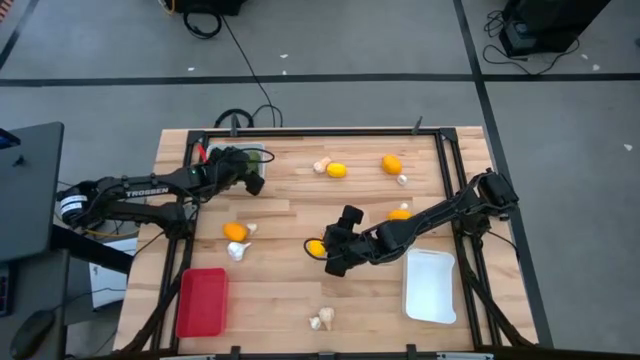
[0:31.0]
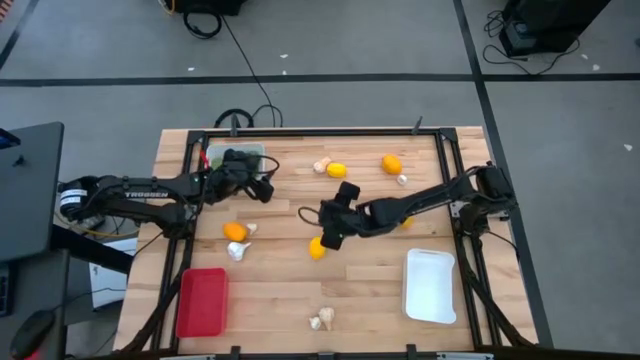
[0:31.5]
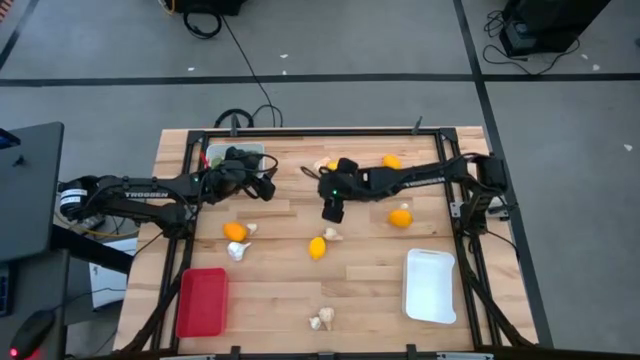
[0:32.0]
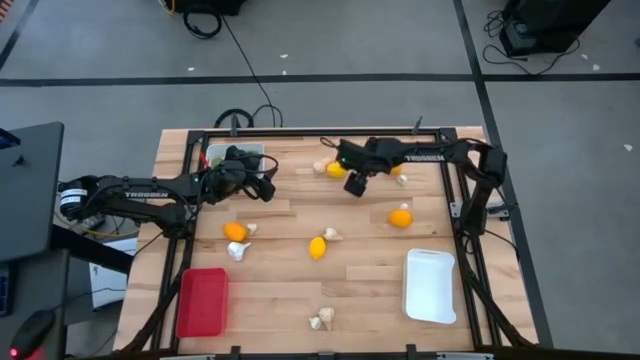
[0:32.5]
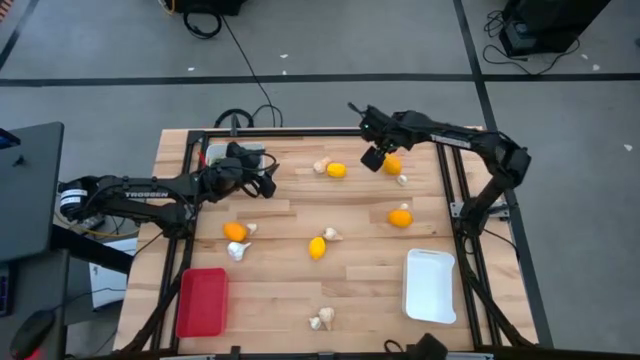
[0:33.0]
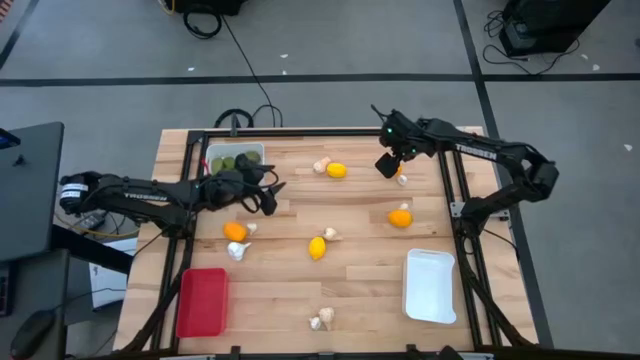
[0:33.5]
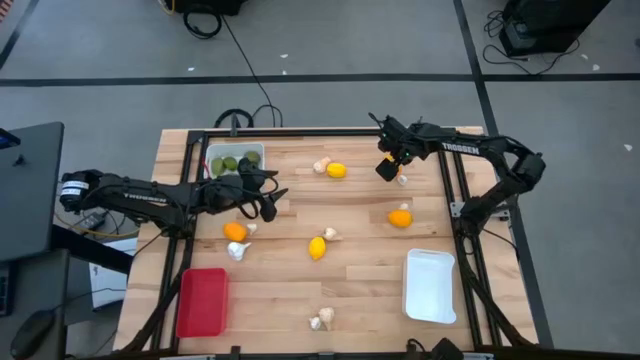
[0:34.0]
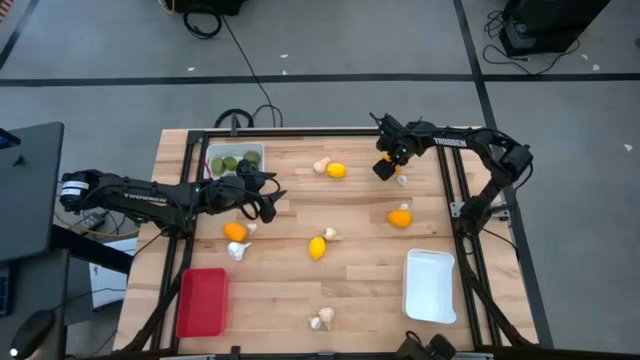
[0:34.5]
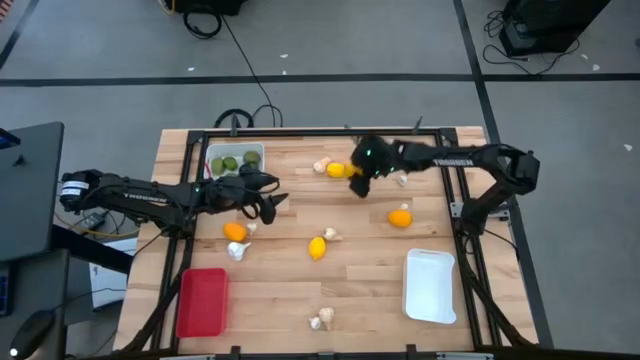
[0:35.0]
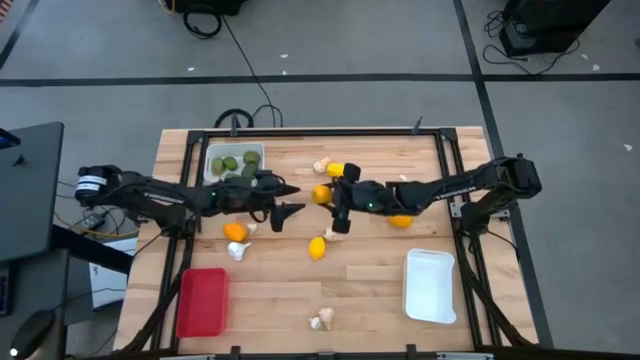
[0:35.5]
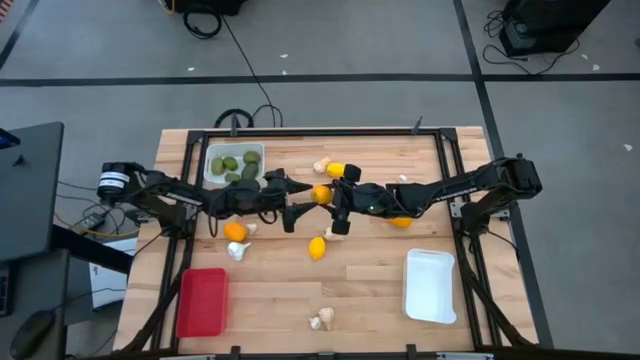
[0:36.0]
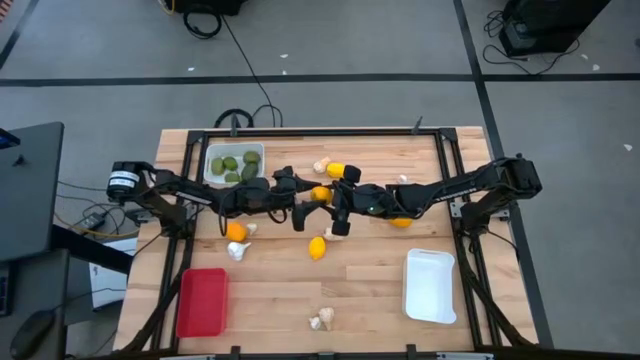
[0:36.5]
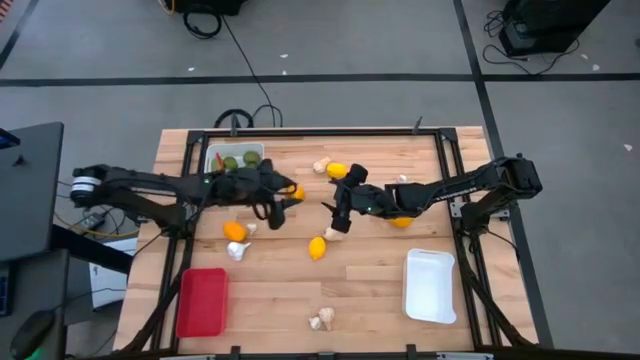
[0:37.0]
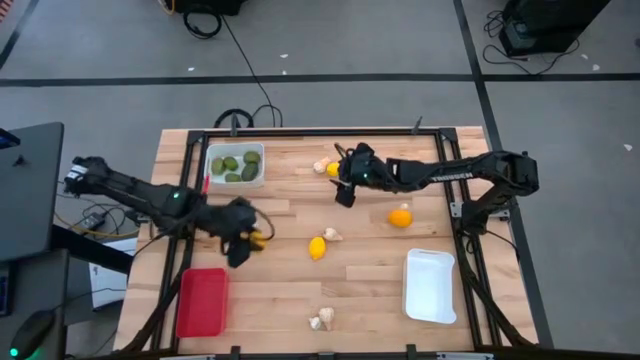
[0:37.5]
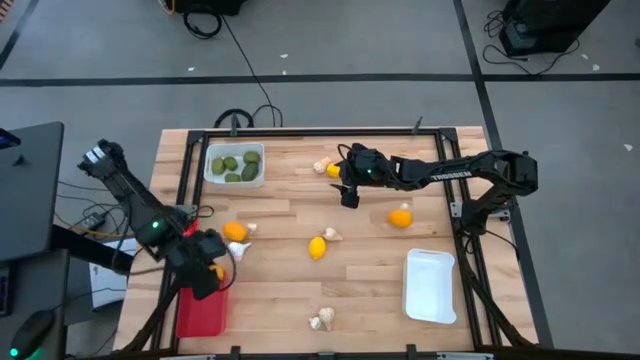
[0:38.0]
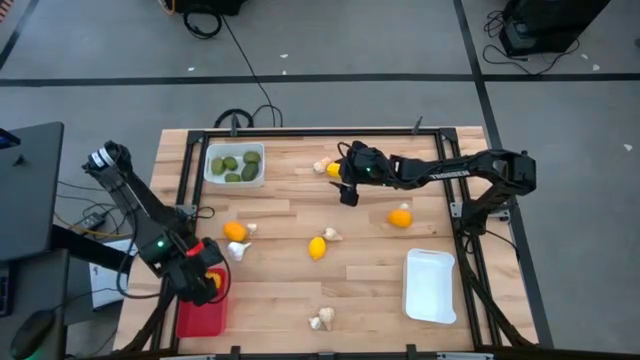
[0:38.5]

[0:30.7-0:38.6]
Task: Sort produce into baskets
Put the top right lemon into the red bin

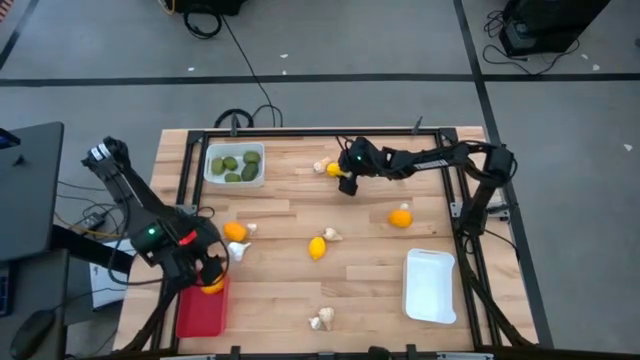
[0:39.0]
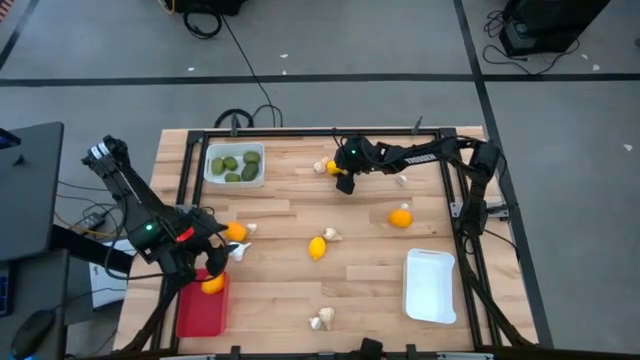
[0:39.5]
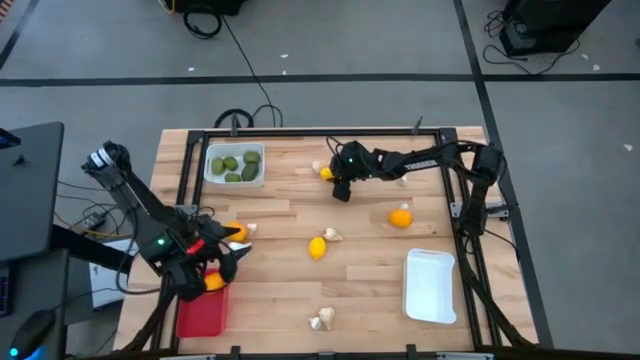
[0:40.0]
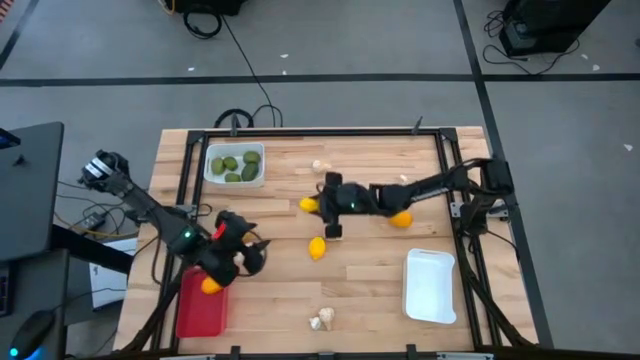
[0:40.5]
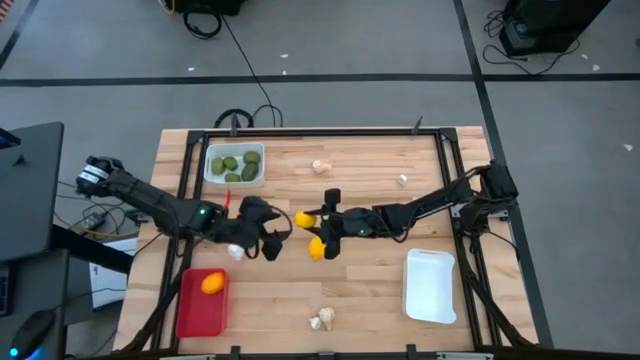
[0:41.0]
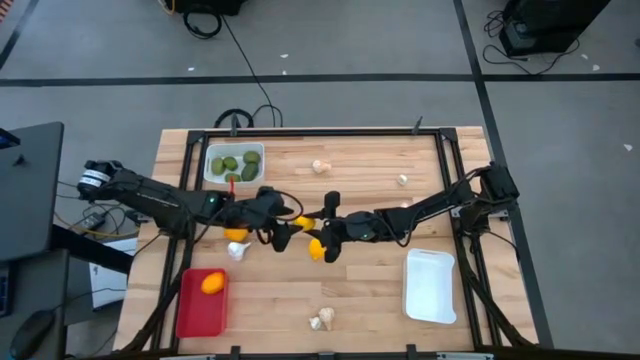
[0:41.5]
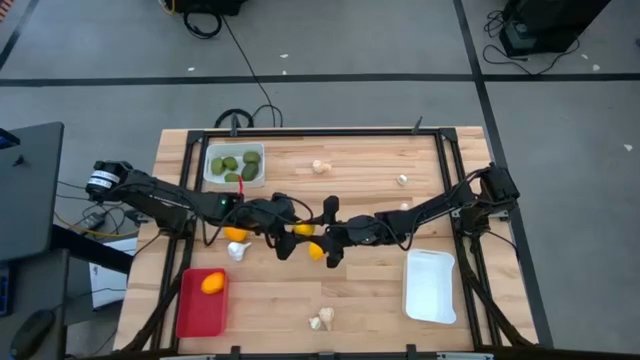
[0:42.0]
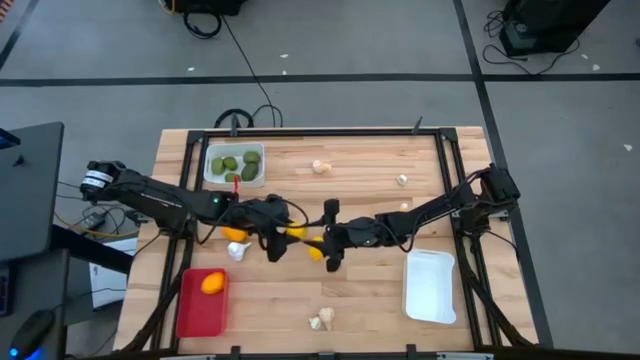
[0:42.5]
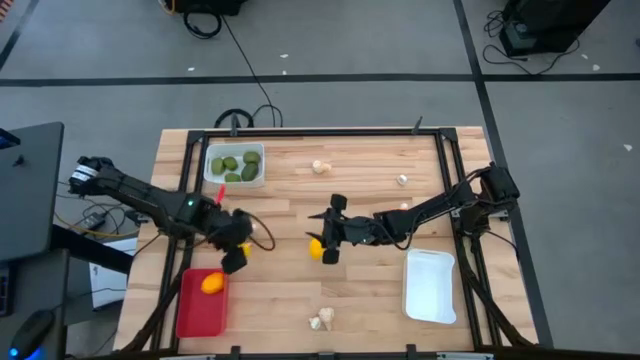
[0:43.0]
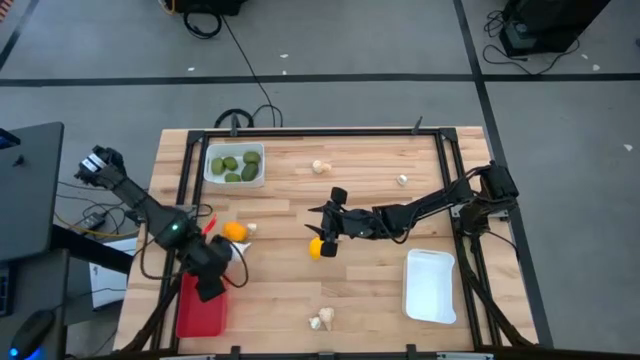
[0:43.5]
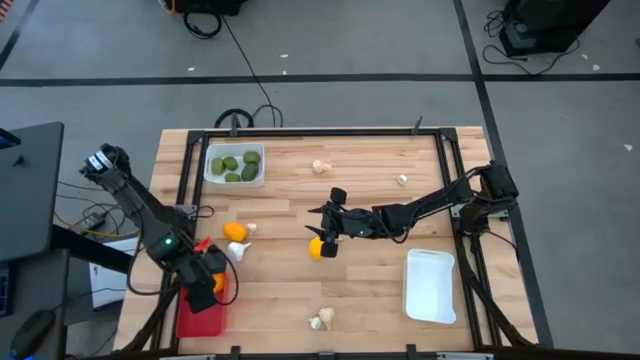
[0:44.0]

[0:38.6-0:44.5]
Put the top center lemon into the red bin

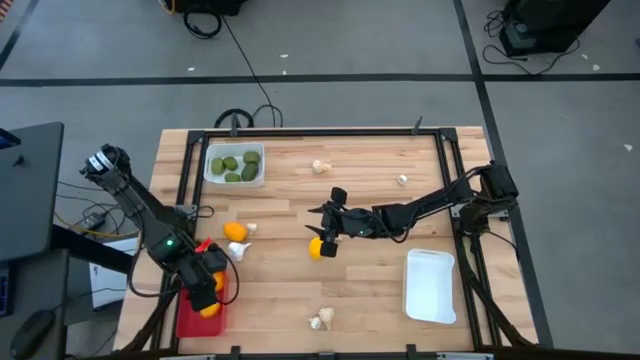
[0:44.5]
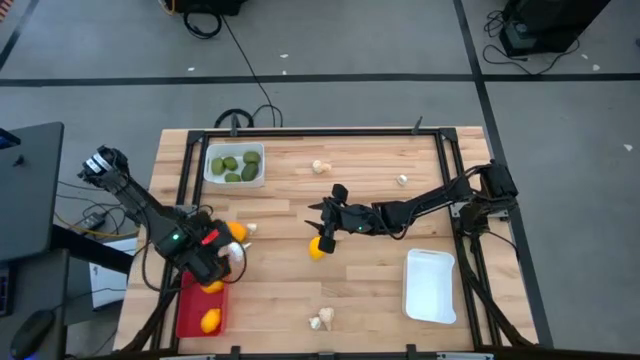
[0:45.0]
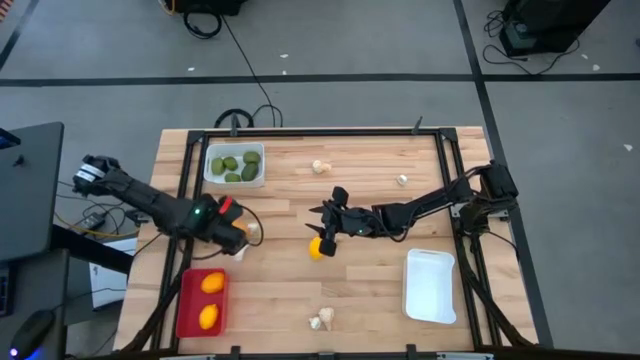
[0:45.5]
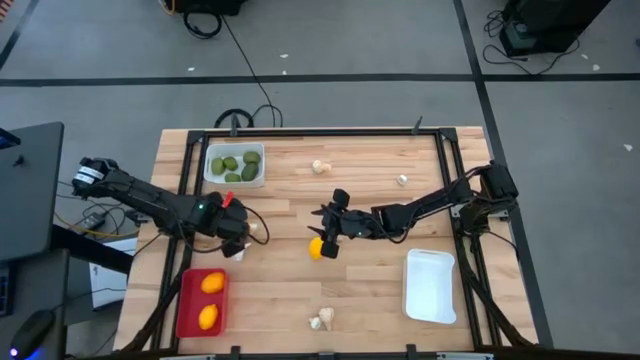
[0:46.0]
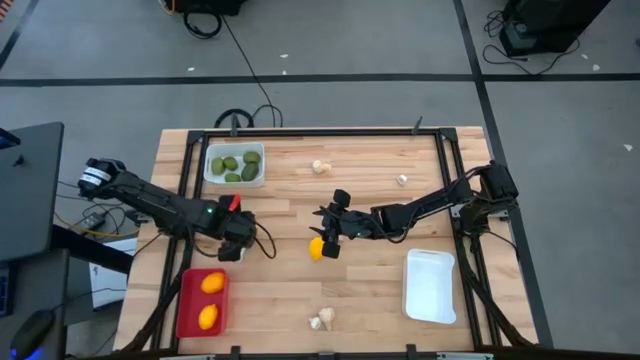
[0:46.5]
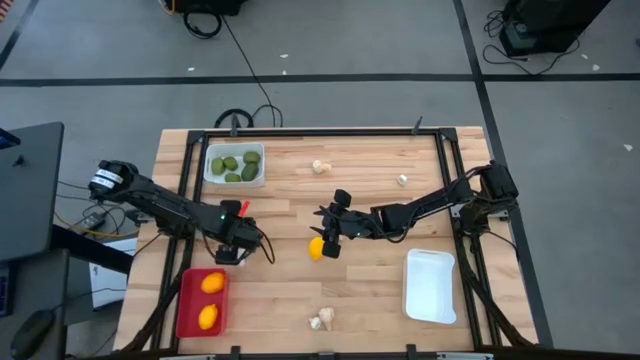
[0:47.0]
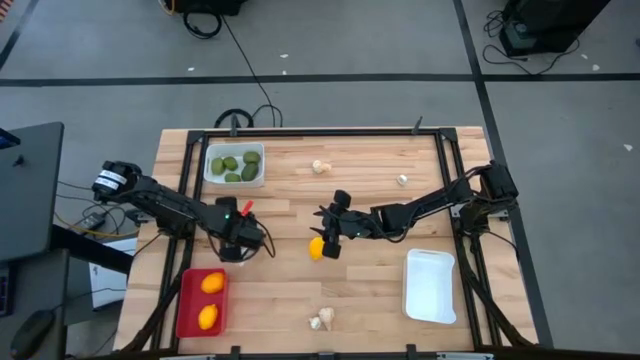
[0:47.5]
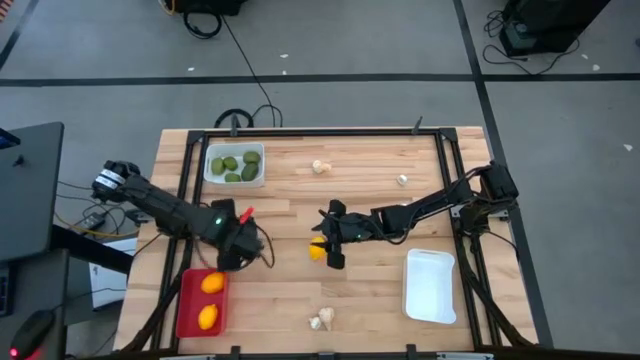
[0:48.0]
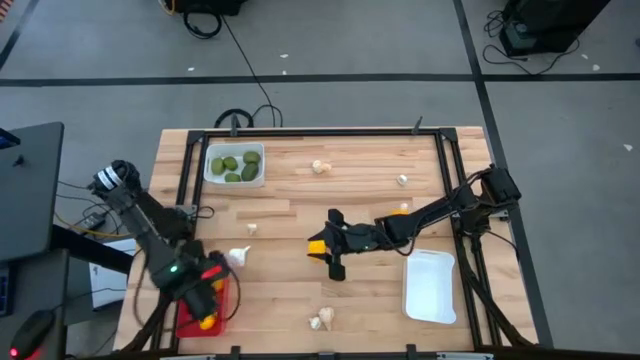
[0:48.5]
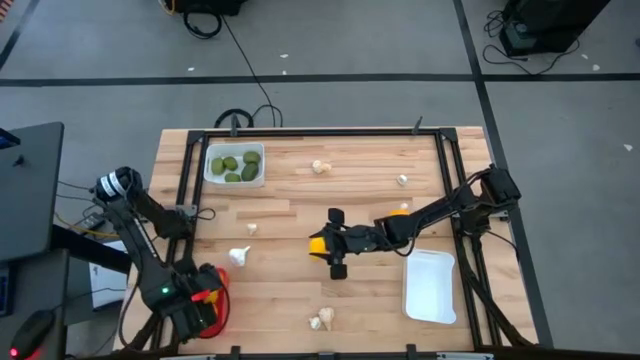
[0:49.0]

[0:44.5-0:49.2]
Put the left yellow lemon into the red bin

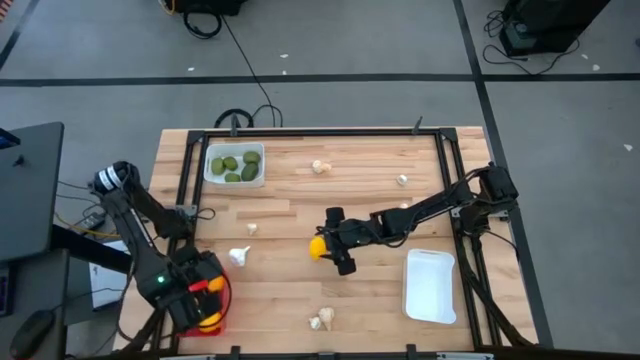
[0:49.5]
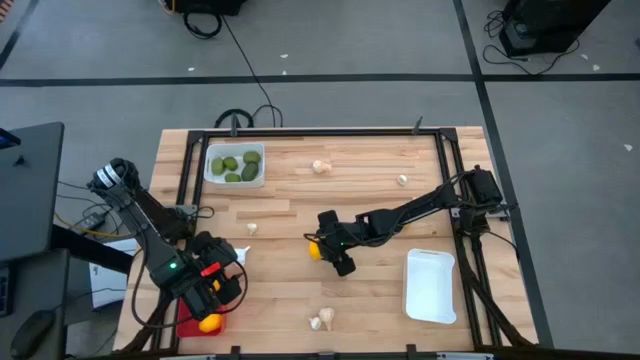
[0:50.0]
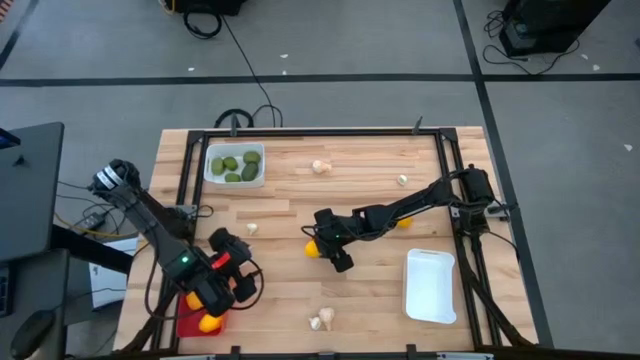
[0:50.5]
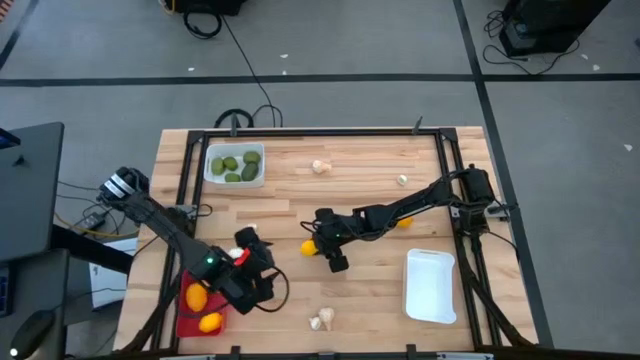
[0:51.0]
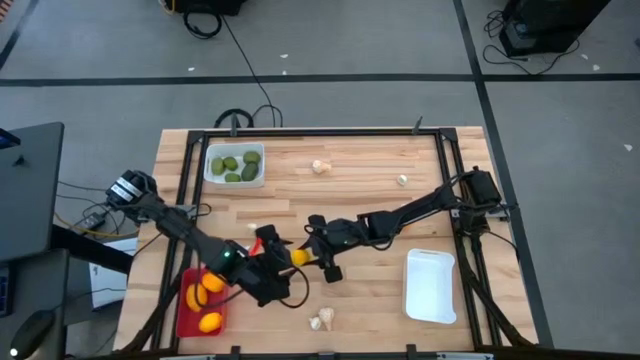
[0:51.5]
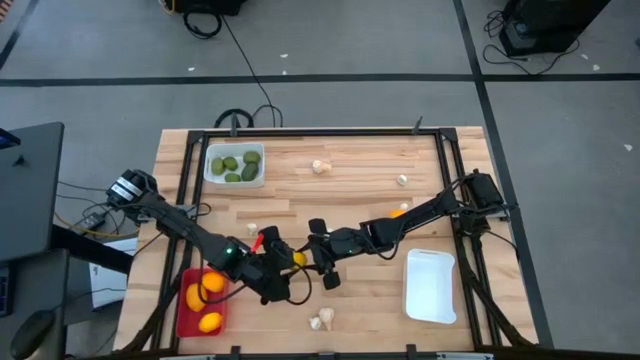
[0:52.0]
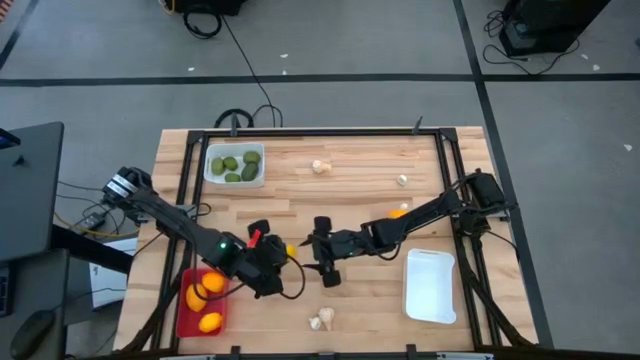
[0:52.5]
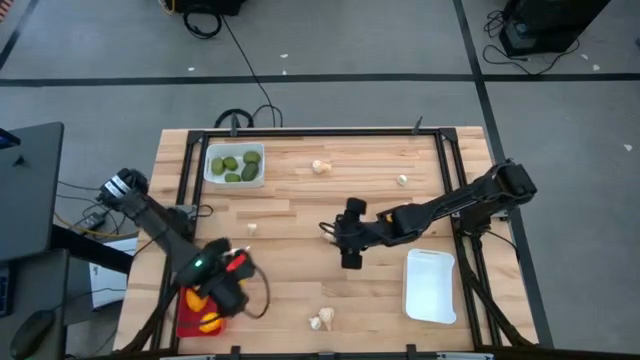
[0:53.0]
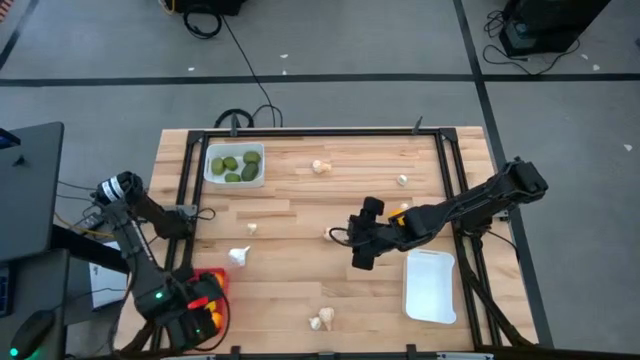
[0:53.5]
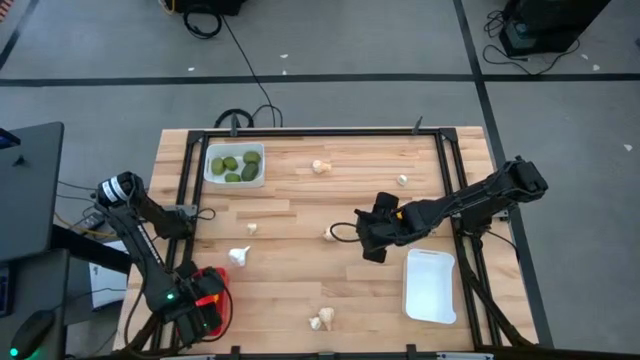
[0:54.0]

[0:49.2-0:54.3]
Put the left yellow lemon into the red bin
